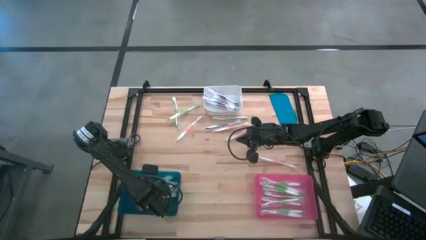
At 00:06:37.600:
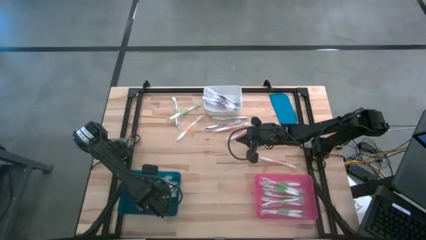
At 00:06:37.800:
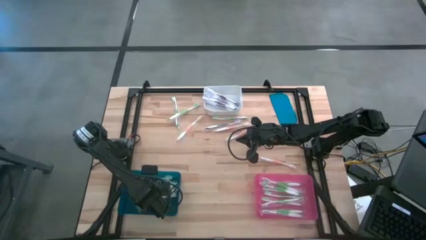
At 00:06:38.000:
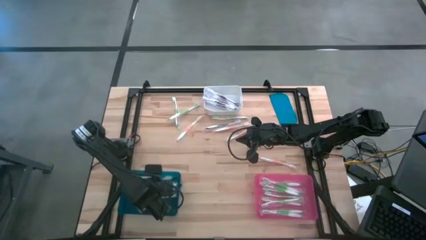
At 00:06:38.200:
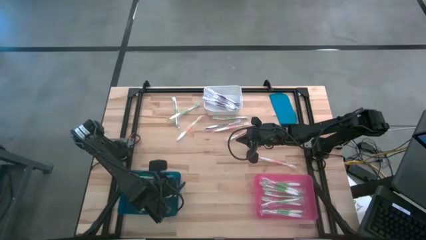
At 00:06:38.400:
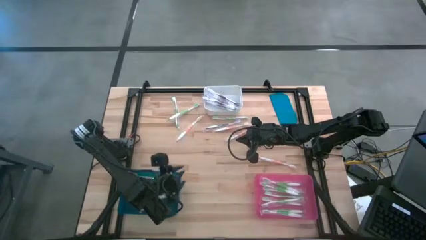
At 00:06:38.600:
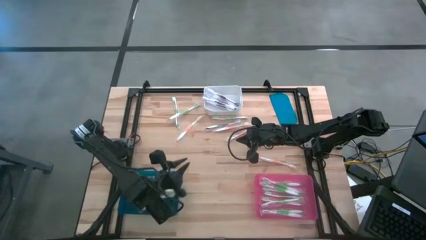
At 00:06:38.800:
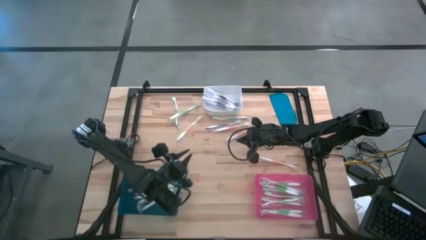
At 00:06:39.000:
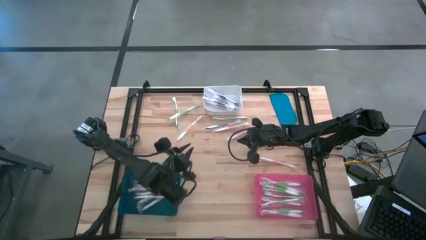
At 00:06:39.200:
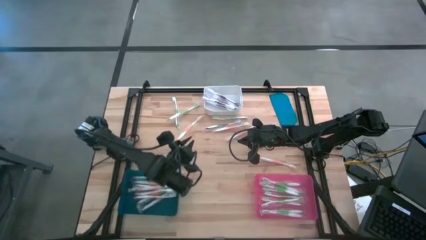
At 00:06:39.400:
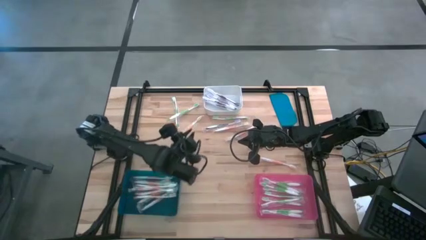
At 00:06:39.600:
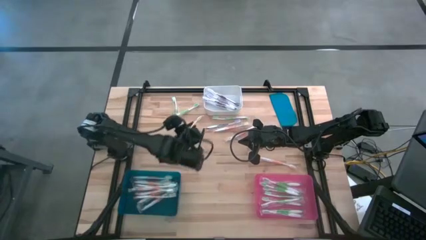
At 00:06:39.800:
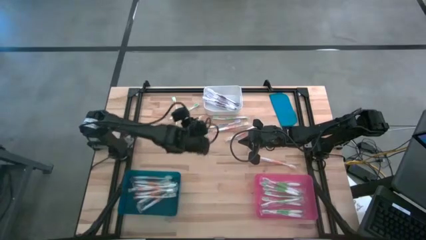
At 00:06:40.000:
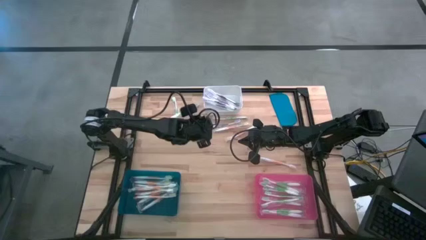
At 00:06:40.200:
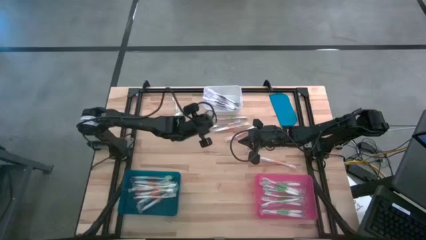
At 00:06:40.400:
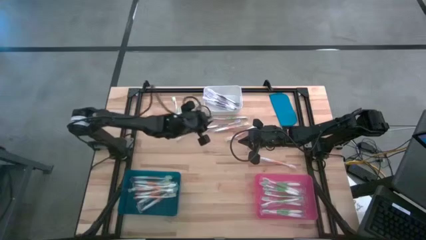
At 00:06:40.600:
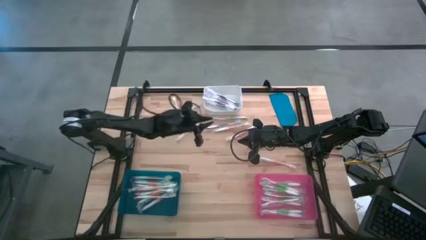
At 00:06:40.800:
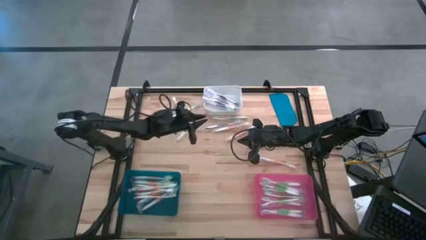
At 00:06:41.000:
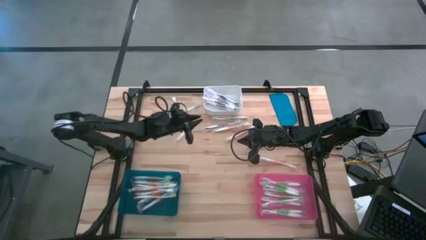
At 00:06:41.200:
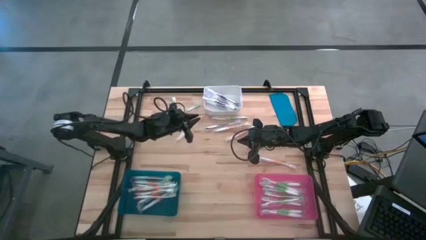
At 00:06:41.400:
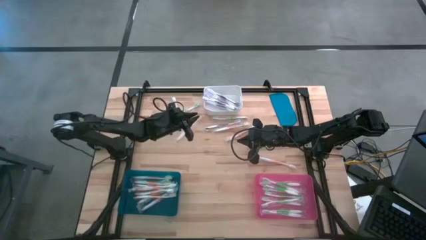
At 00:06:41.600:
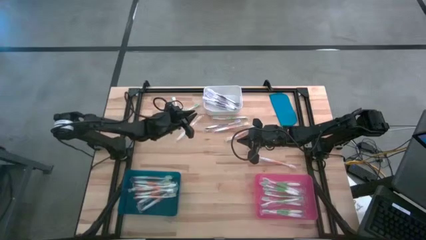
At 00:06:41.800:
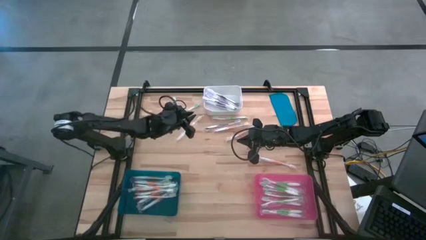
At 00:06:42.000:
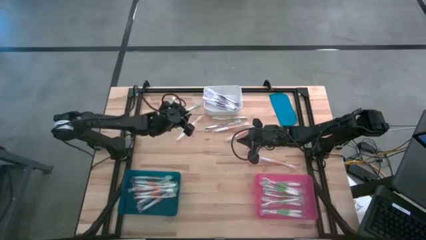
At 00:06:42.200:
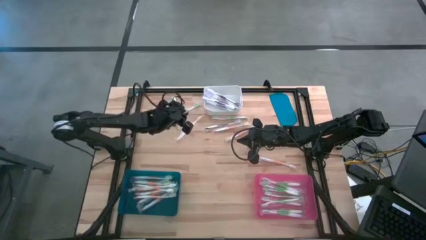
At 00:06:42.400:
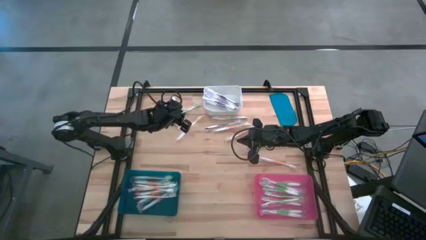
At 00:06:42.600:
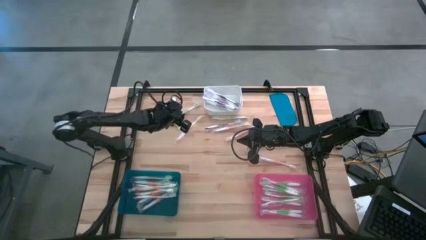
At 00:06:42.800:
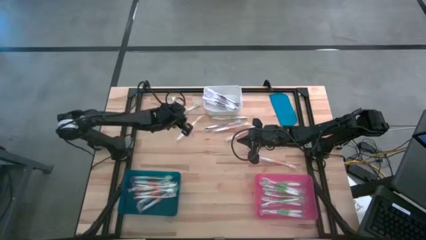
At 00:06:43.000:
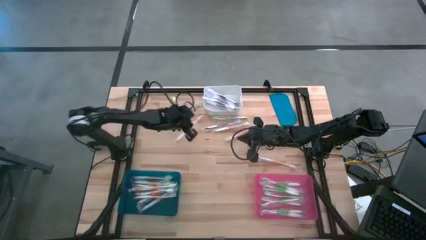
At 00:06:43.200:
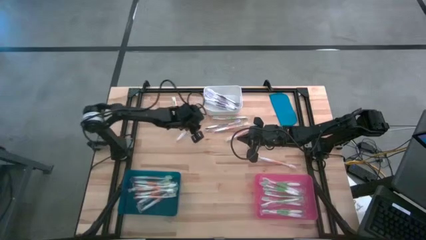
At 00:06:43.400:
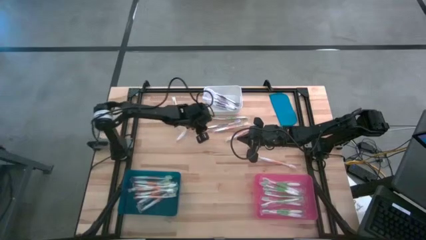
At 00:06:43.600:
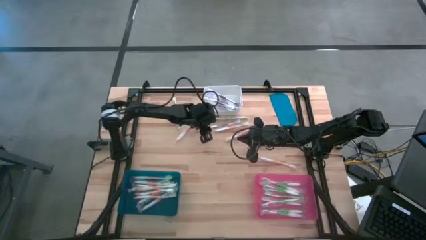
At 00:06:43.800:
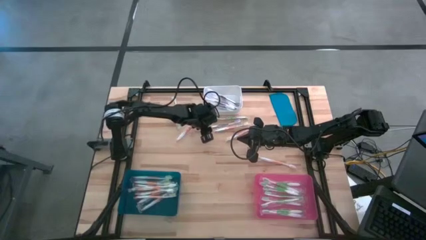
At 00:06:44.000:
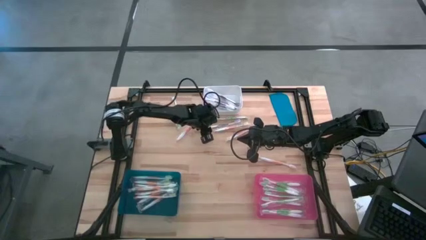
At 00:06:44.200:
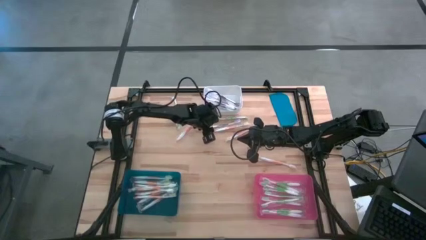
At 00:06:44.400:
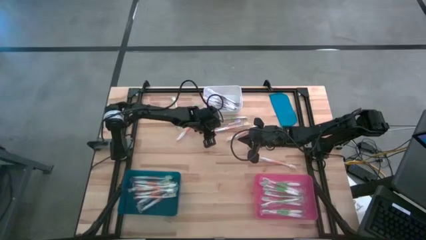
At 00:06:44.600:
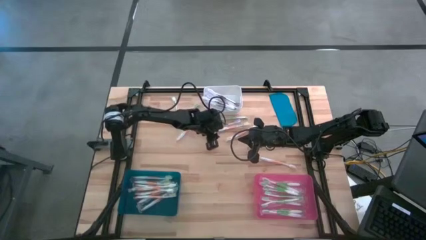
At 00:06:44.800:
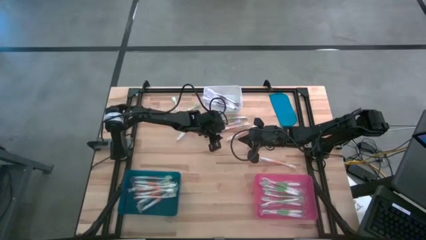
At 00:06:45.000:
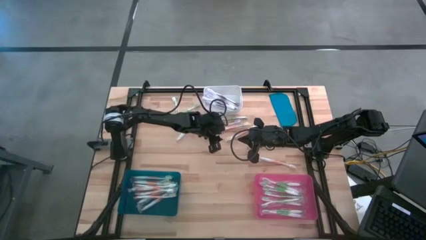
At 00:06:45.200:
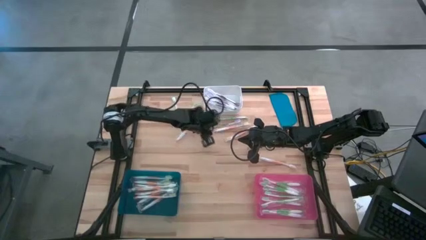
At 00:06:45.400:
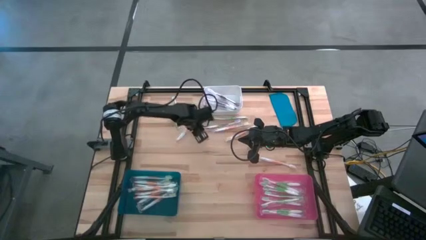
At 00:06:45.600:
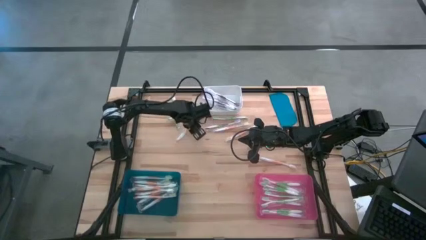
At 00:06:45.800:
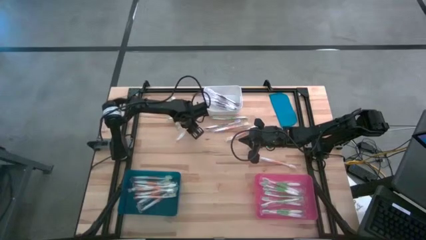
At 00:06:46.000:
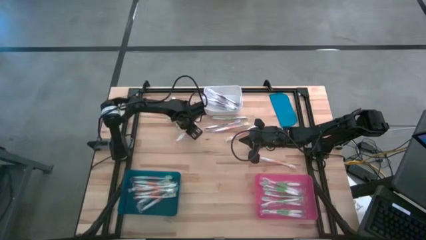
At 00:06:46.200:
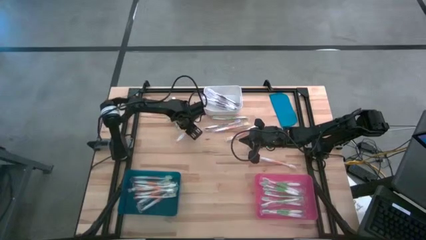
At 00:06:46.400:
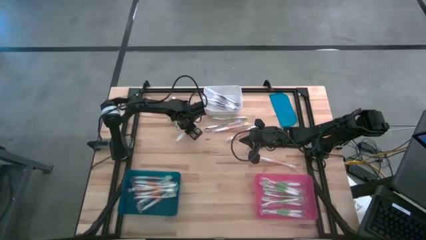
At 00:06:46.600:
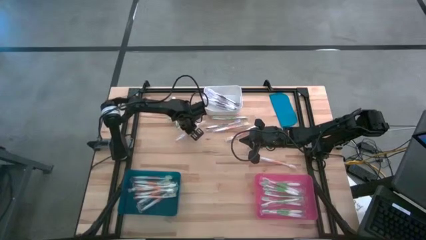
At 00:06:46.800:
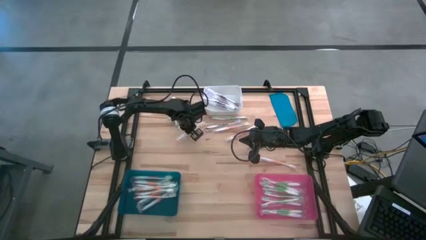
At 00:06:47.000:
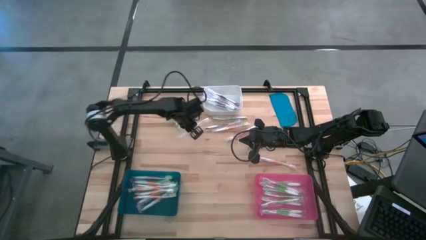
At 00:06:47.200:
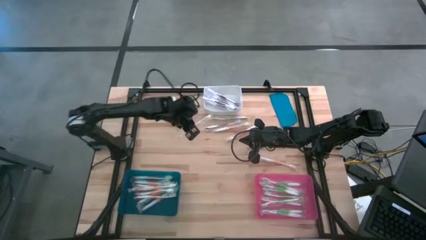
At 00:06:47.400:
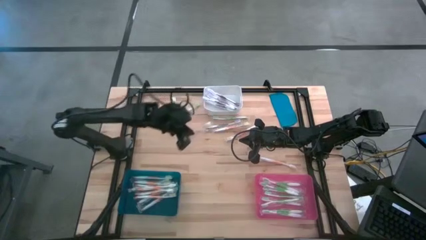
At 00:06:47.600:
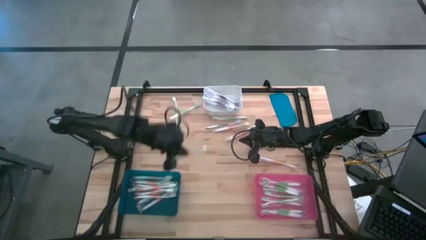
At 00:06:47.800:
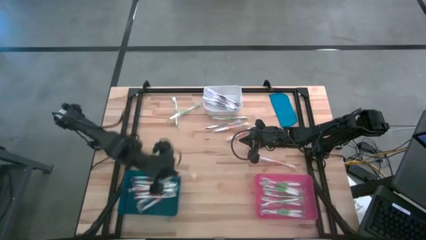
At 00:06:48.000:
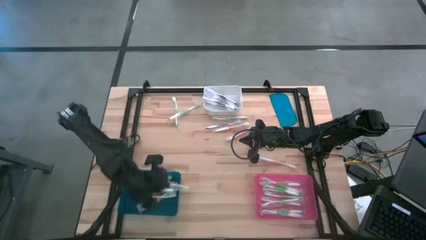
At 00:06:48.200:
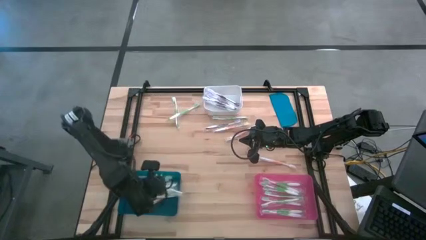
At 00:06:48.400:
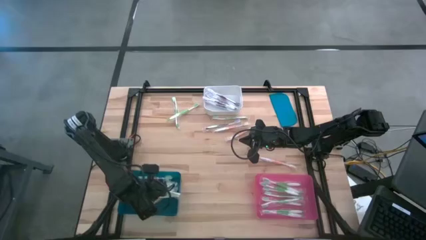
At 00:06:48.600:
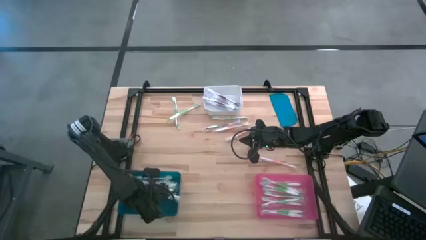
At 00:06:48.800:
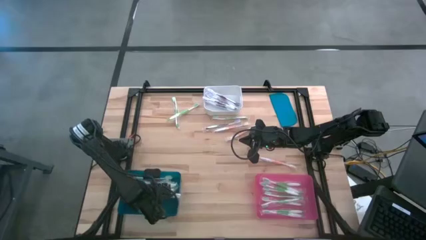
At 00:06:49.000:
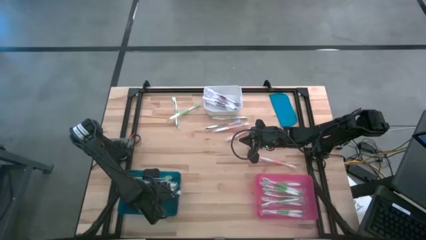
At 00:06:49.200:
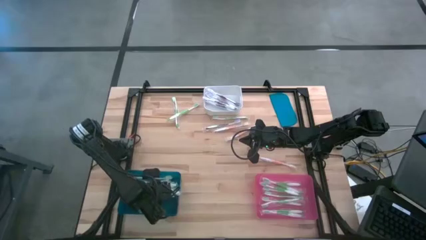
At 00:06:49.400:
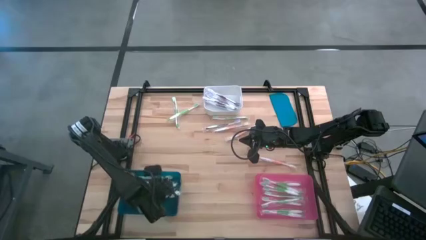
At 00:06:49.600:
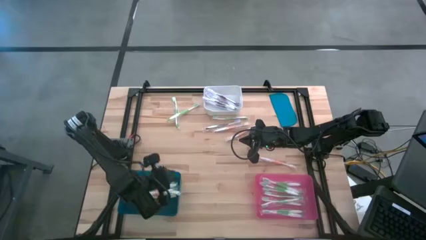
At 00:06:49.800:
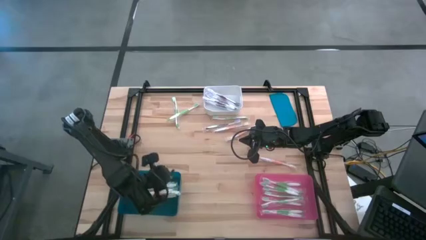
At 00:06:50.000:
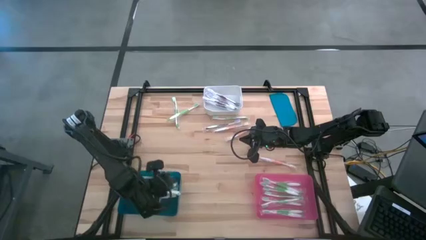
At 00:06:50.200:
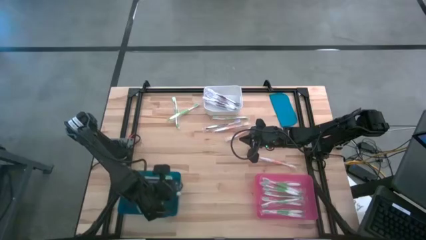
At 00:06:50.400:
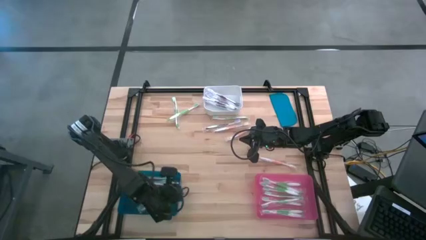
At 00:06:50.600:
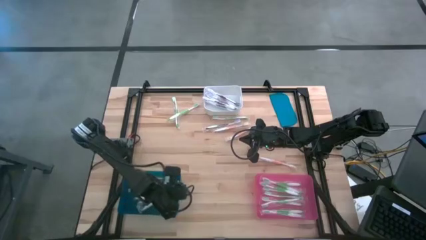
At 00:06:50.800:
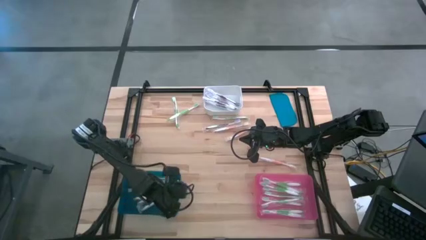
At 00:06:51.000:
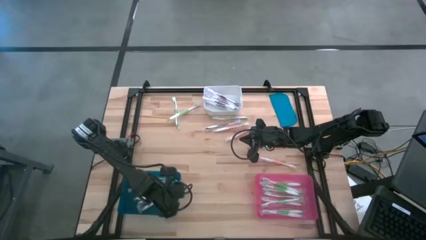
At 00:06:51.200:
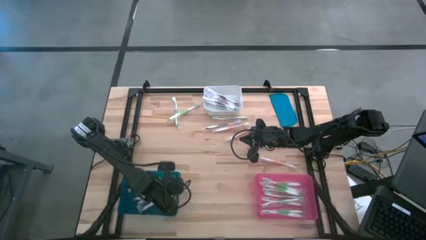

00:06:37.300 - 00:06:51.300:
Task: Pick & Place Toothbrushes
Put the orange toothbrush into the blue bin
